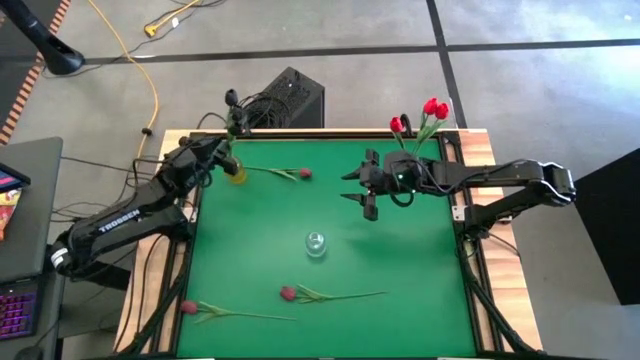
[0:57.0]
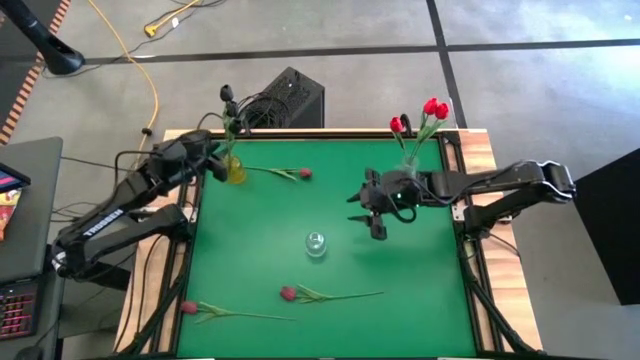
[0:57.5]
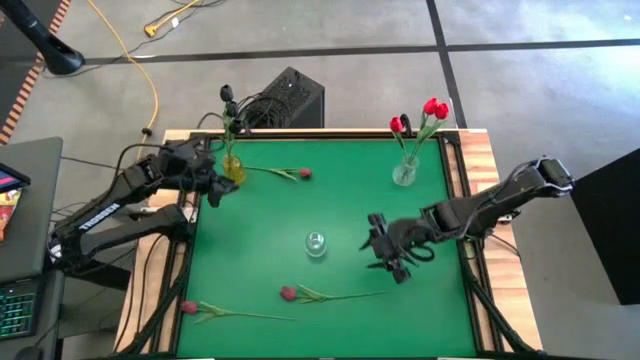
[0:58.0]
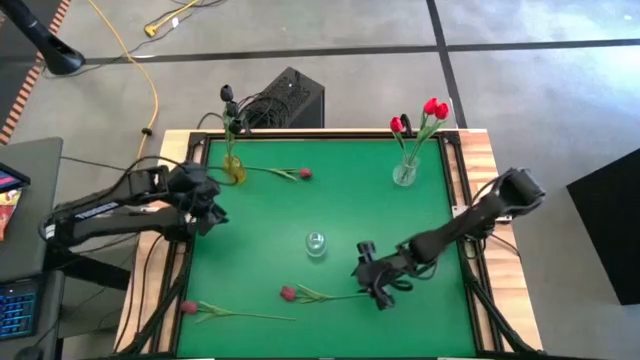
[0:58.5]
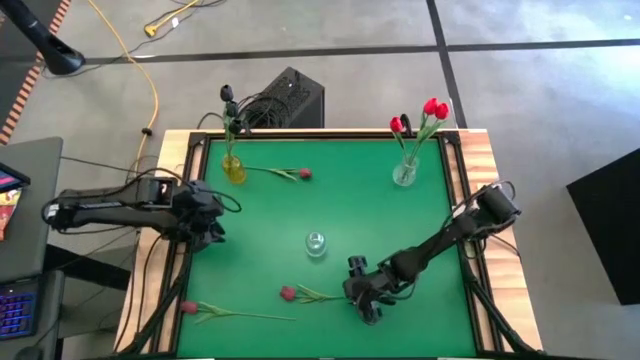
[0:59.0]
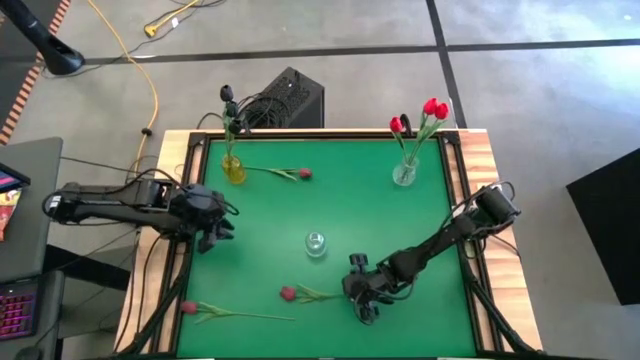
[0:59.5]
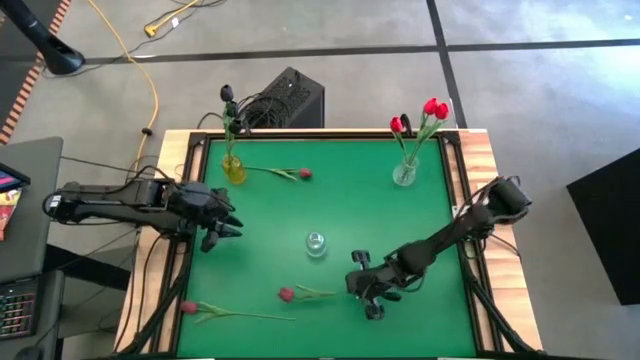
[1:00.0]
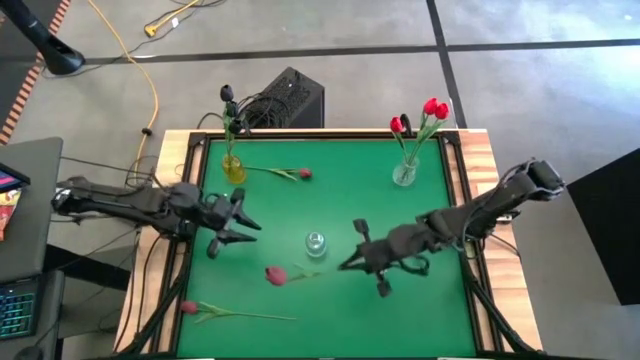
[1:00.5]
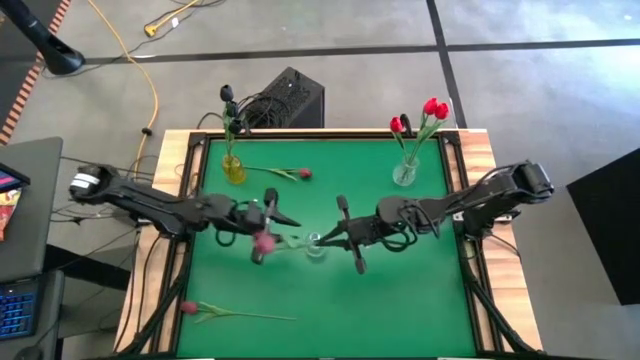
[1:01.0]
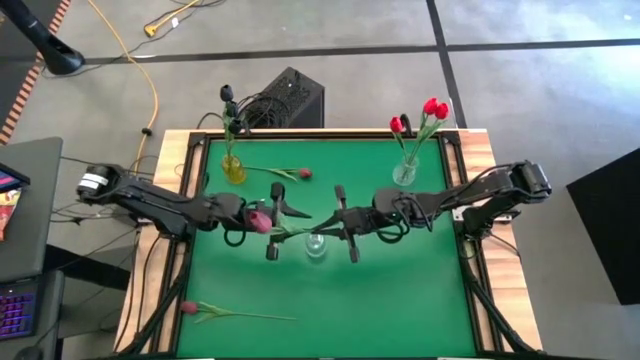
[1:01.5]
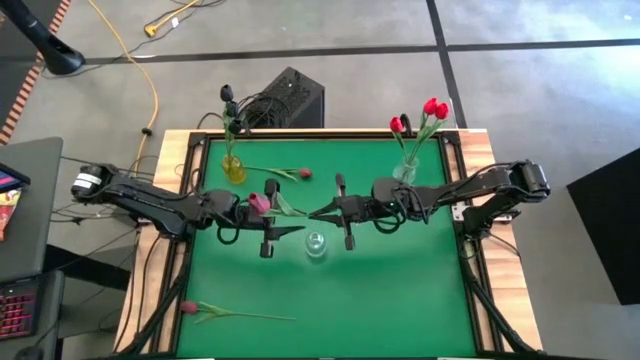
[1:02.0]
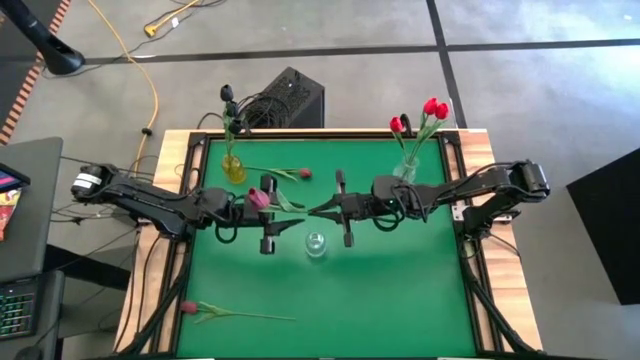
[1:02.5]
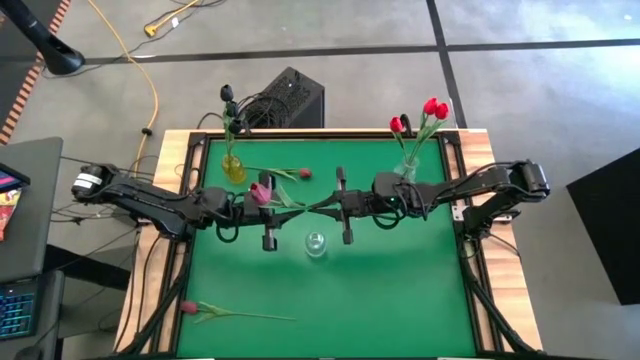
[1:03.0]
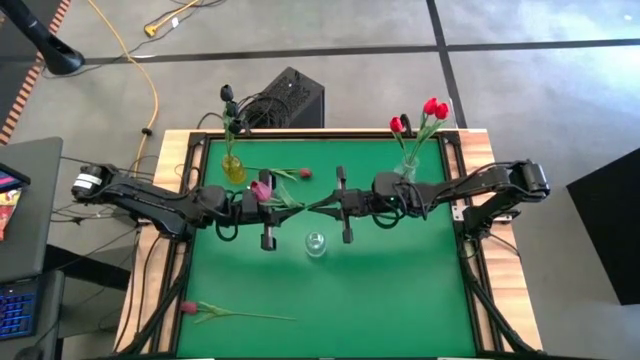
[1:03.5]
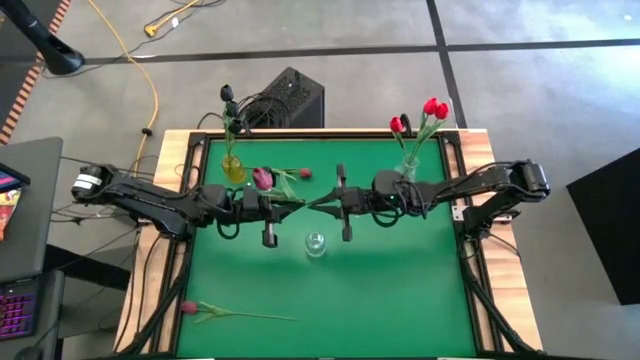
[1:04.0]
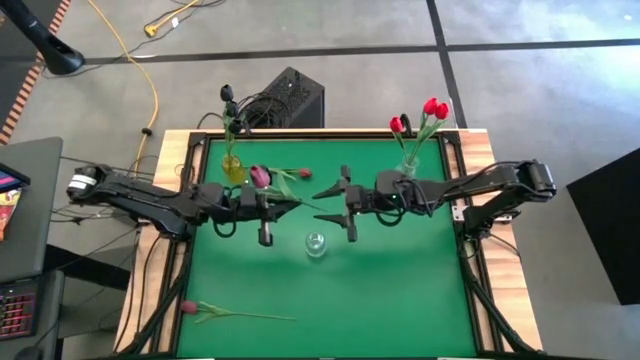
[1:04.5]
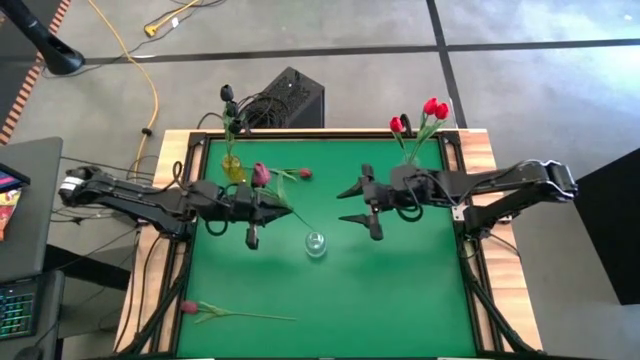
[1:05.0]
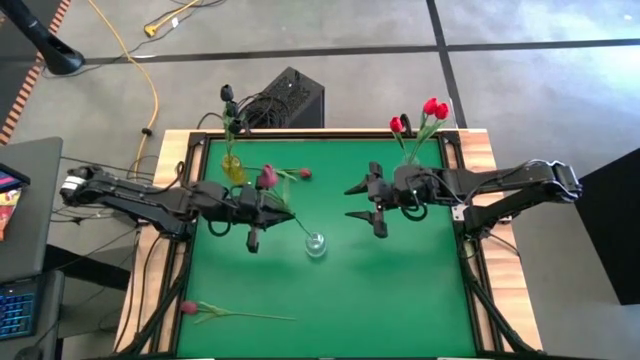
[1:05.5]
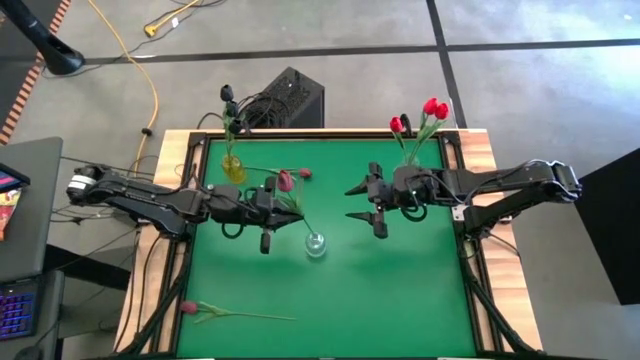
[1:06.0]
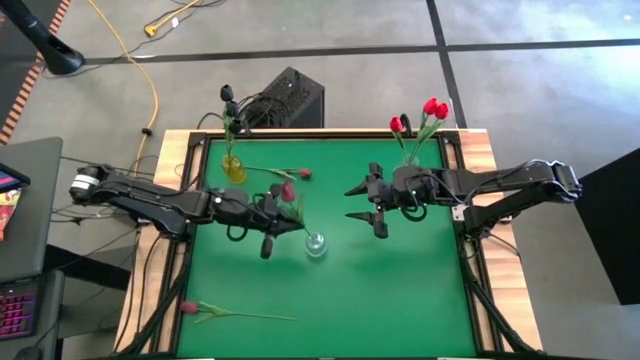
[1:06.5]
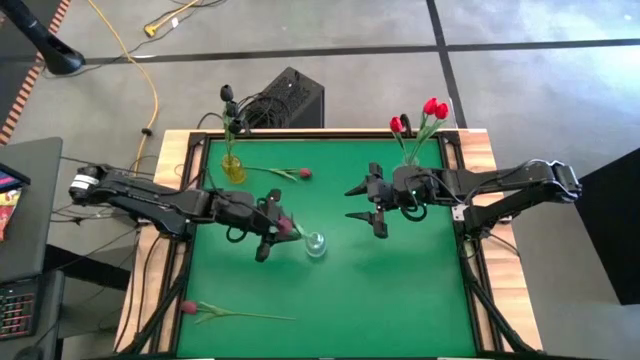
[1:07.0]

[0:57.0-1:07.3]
Task: Sort flowers into vase by color
Put the right dark red tulip into the bottom transparent vase

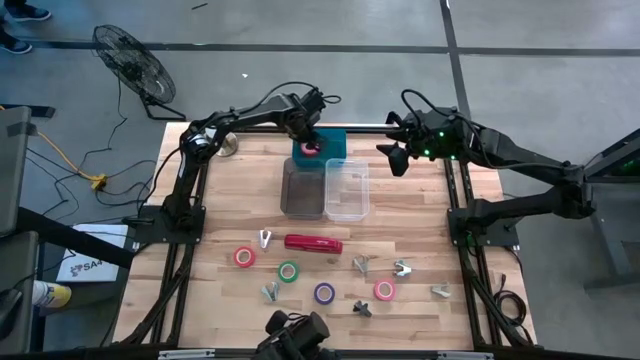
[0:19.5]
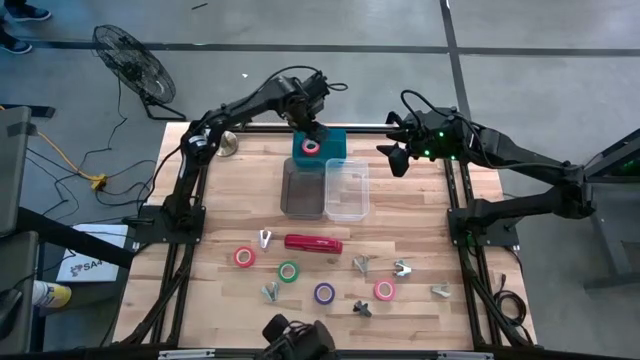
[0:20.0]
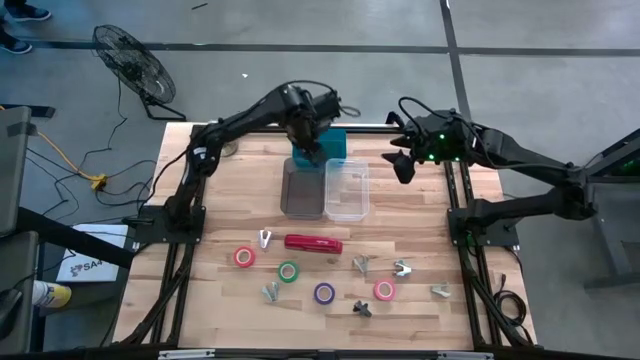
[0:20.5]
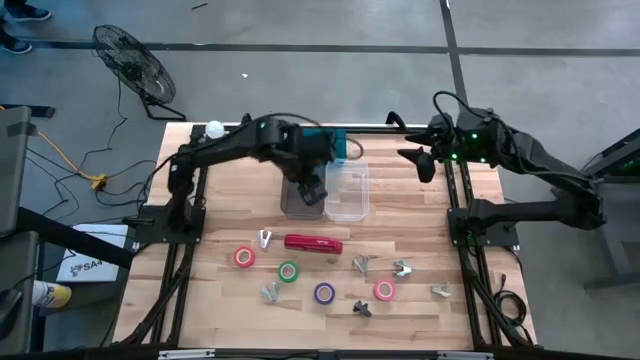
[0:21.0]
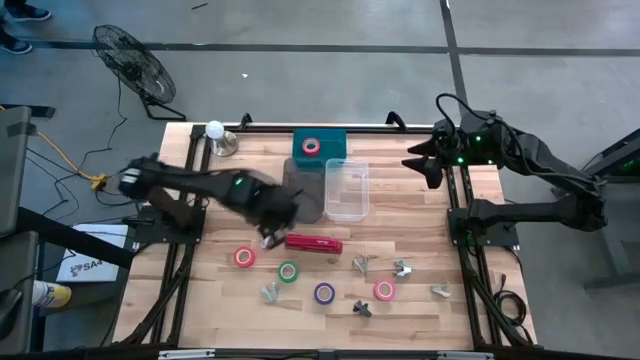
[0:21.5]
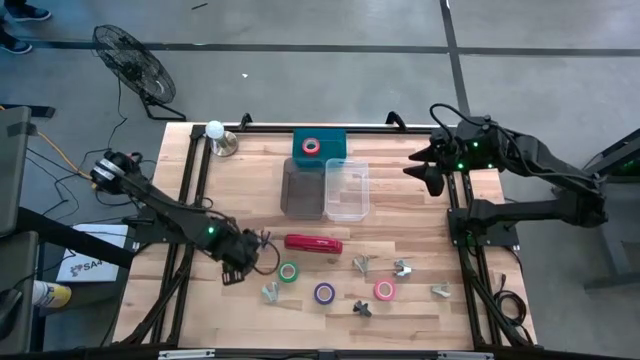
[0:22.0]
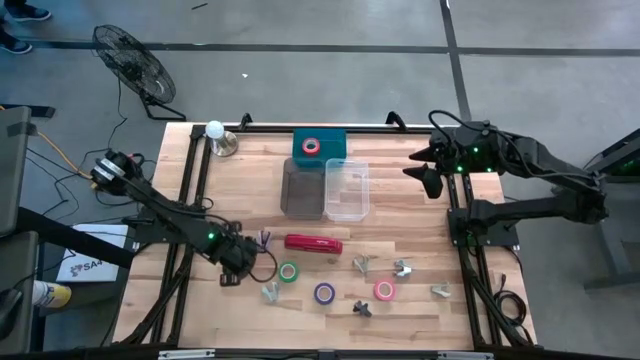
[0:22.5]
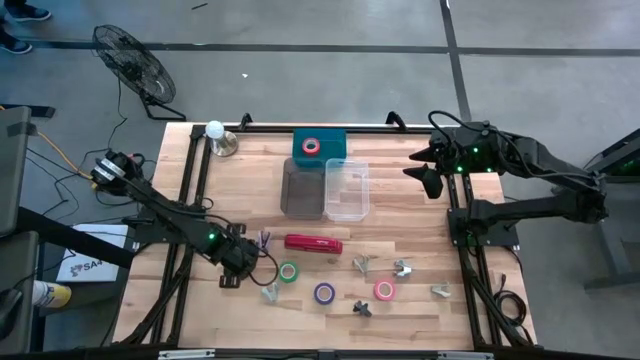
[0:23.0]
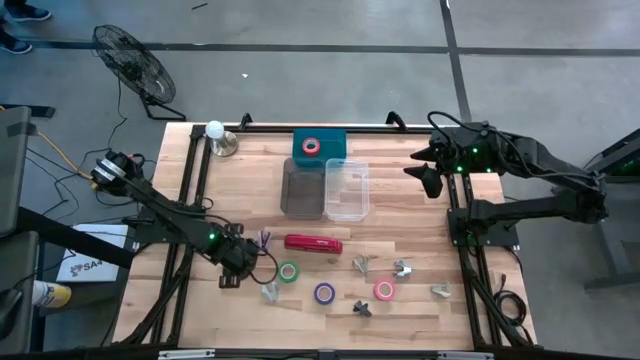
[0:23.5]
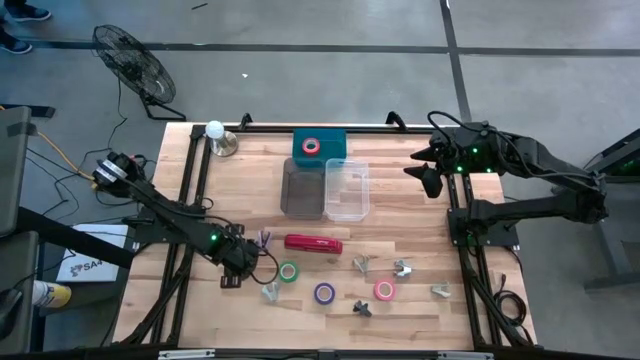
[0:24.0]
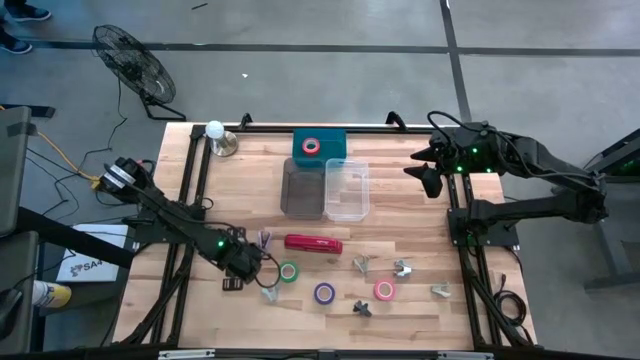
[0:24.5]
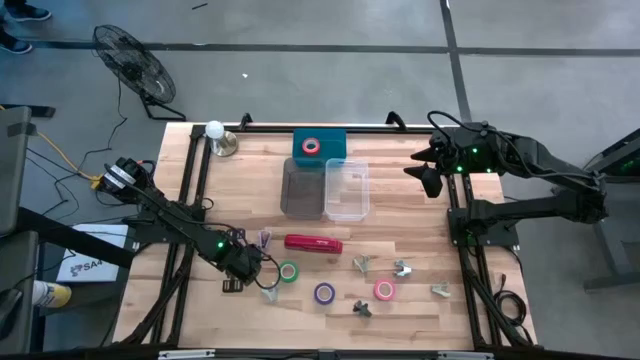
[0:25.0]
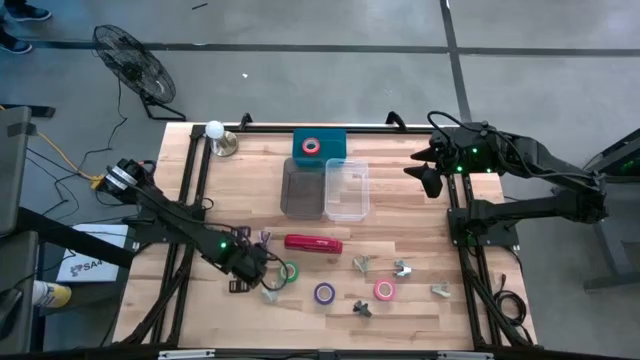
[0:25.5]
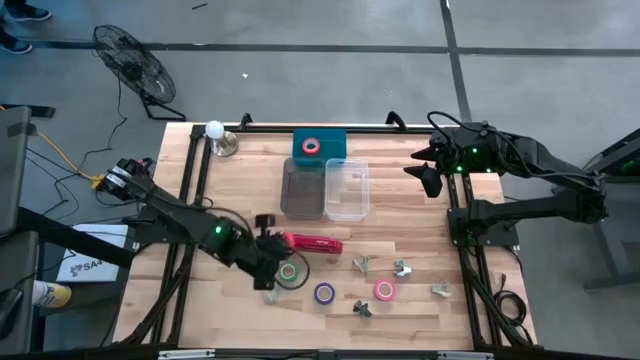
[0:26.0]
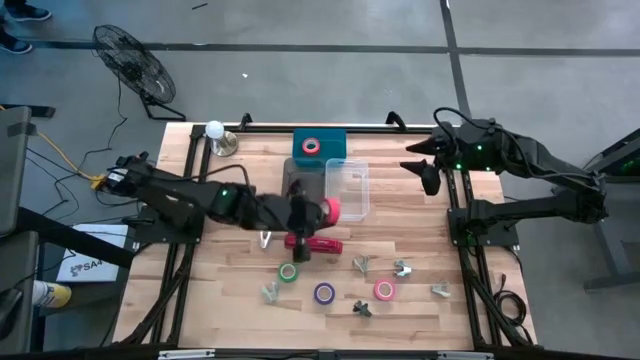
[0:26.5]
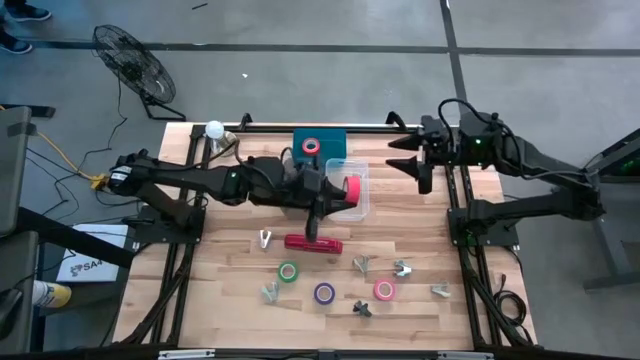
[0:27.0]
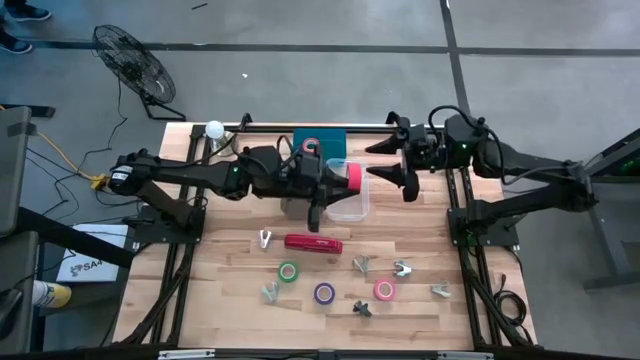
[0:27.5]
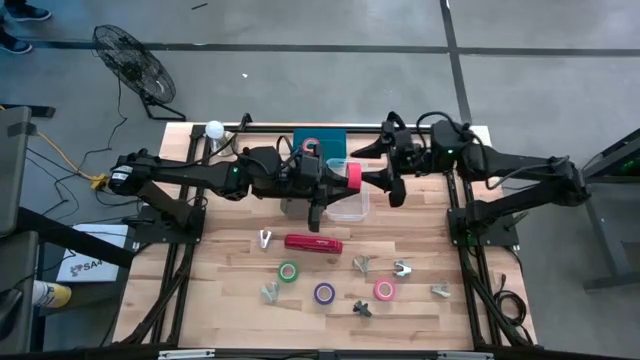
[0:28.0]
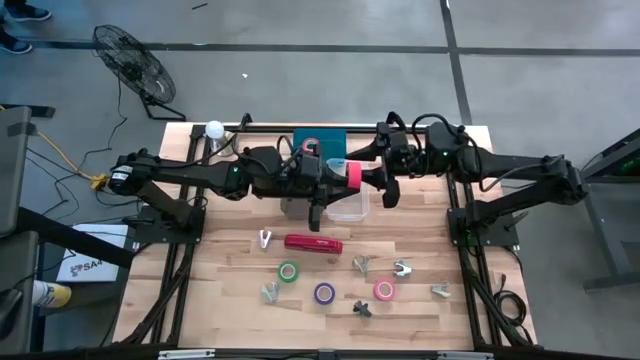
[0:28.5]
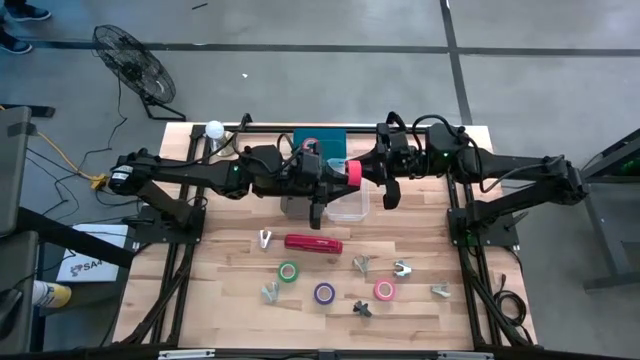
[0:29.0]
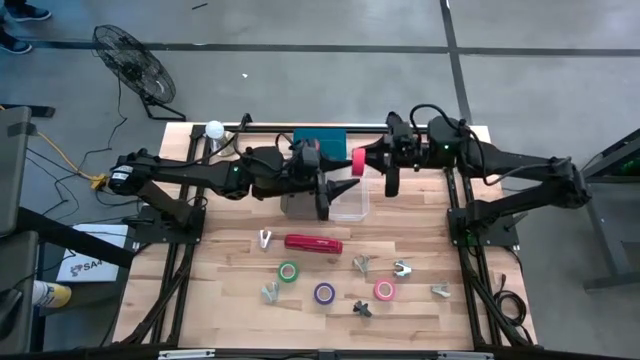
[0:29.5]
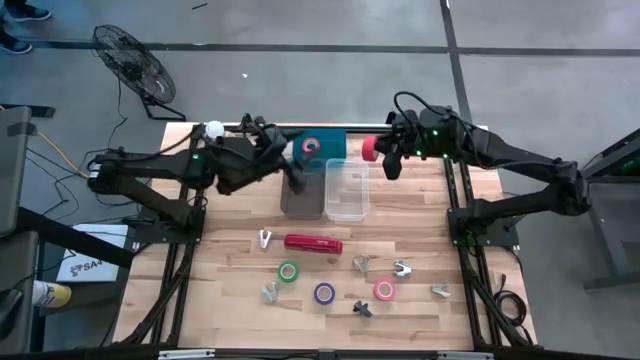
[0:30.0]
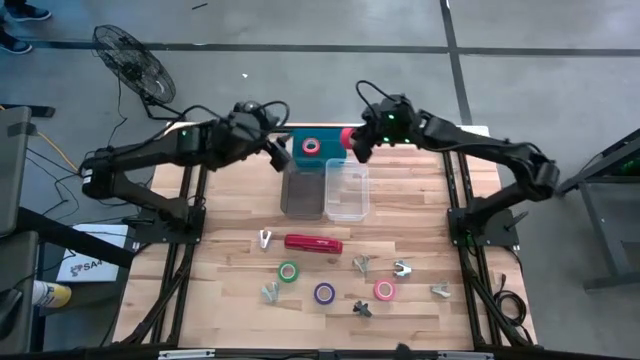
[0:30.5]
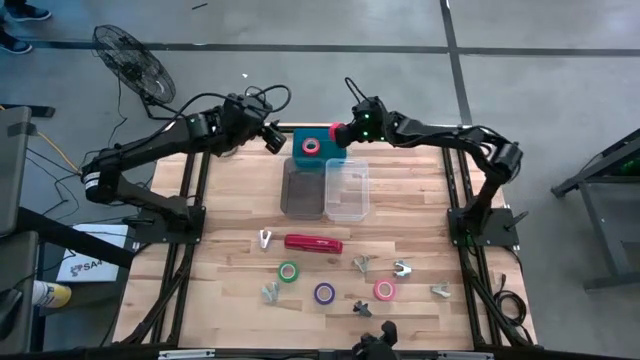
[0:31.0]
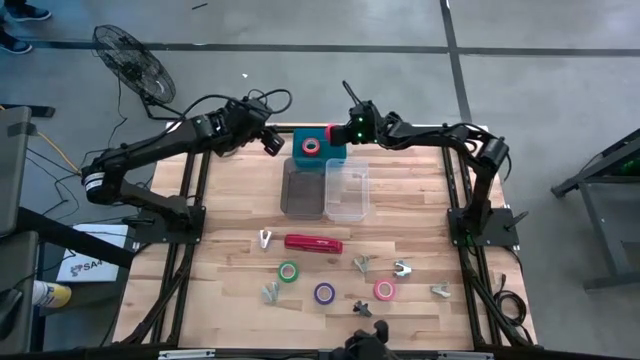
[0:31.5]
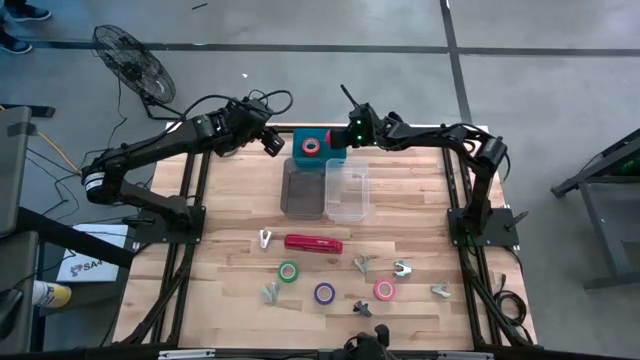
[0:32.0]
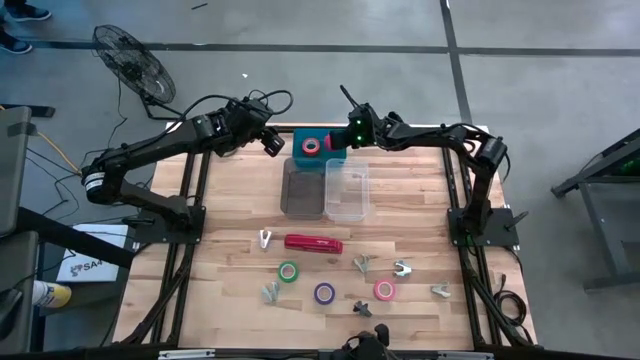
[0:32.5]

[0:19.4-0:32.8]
Task: Pick and place Stapler, Stapler remover, tape
Put the red tape into the blue bin
